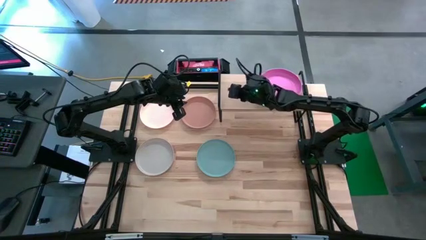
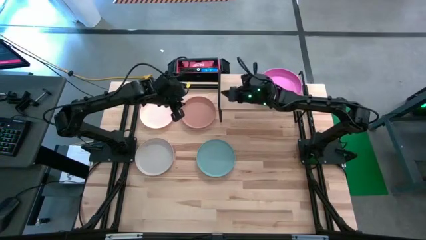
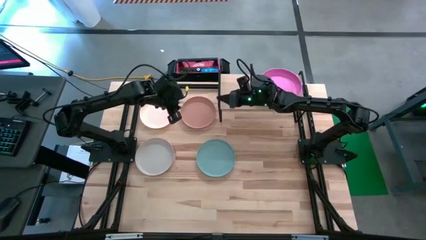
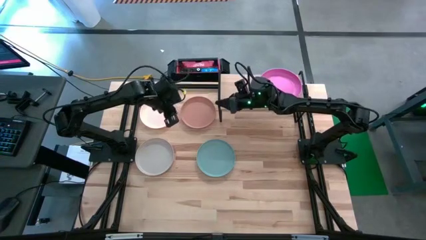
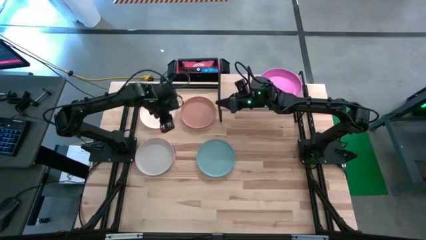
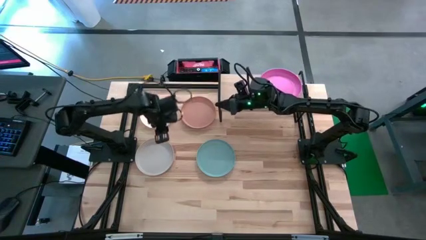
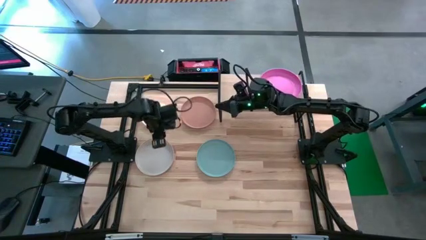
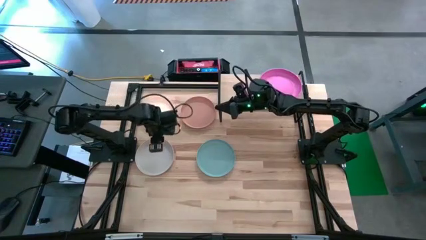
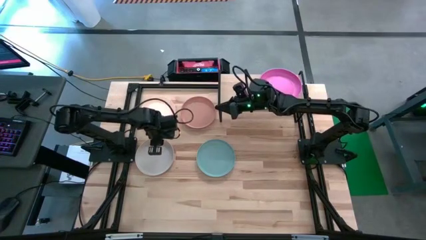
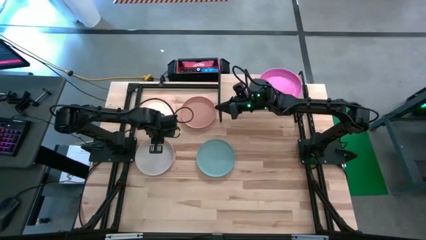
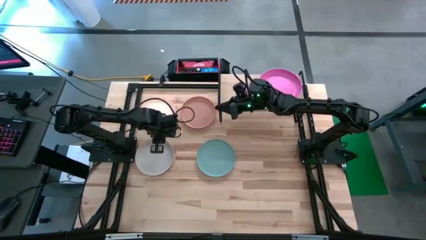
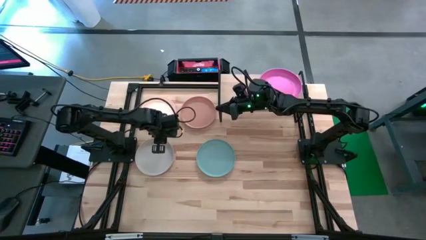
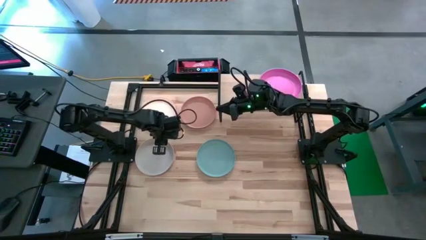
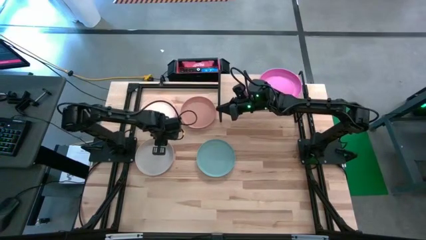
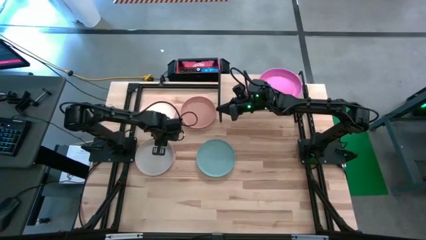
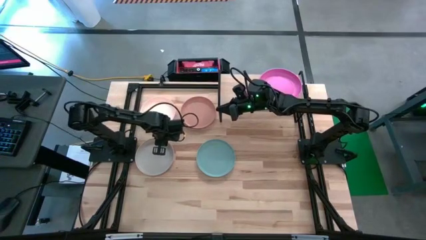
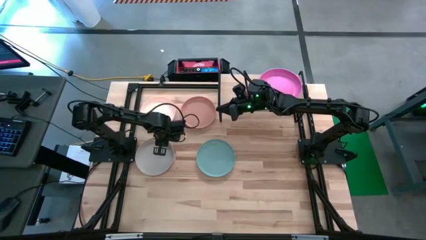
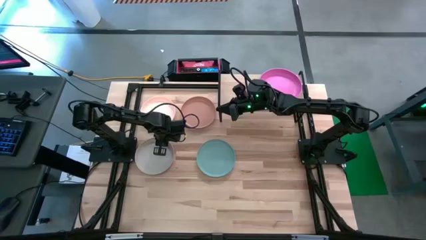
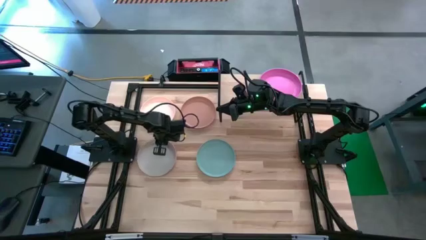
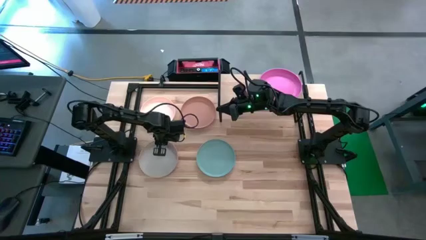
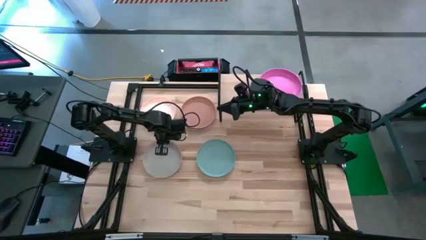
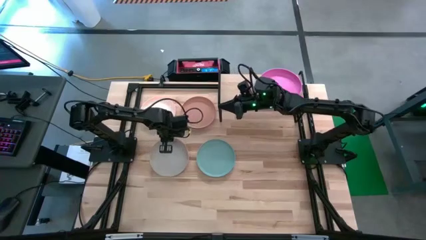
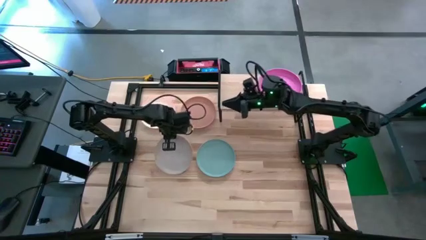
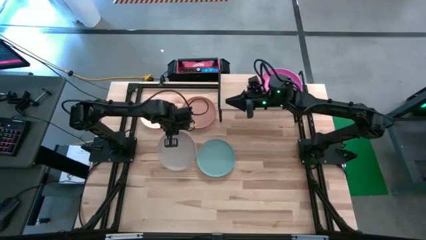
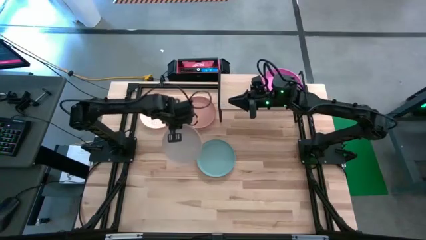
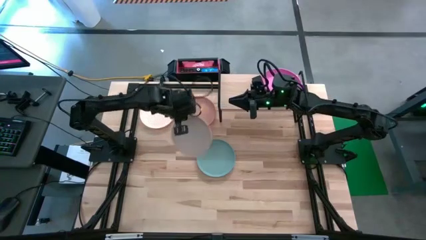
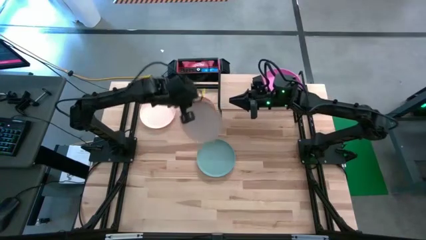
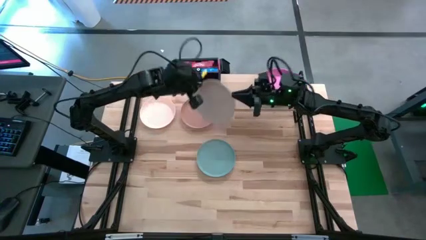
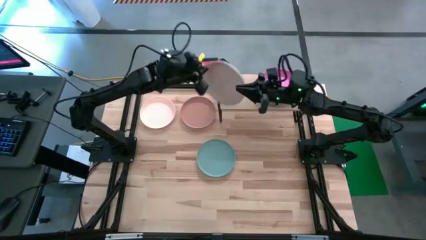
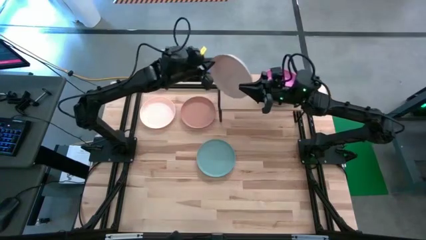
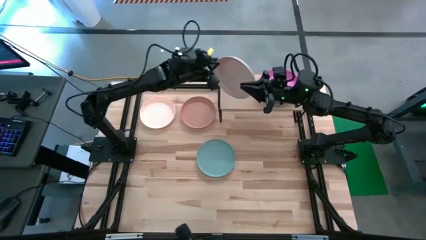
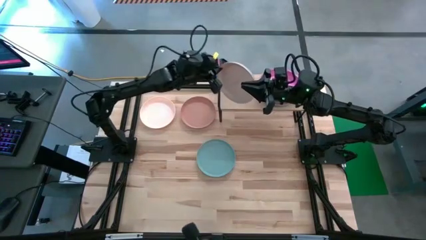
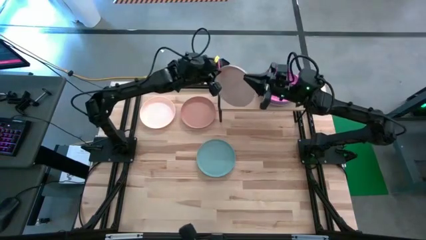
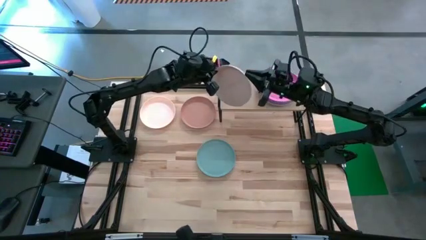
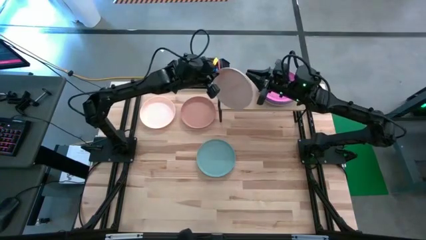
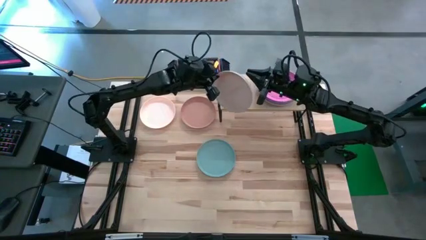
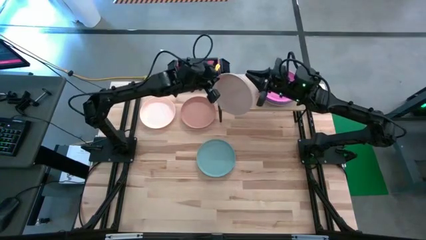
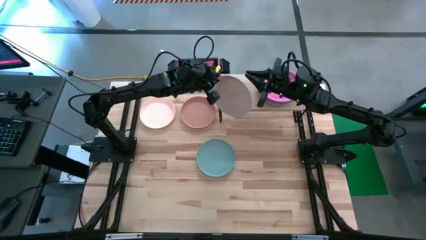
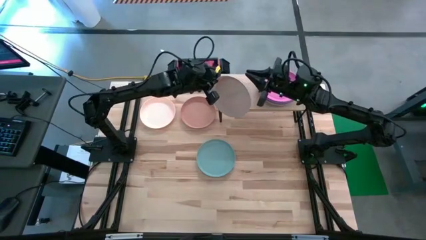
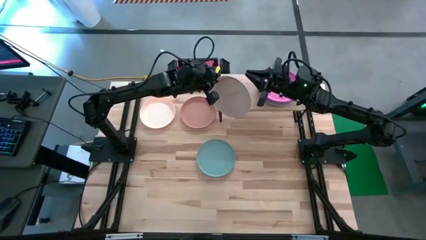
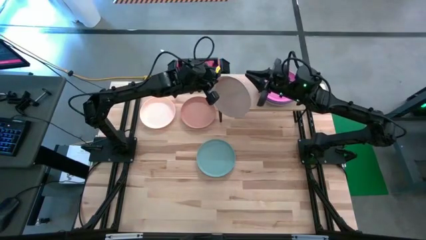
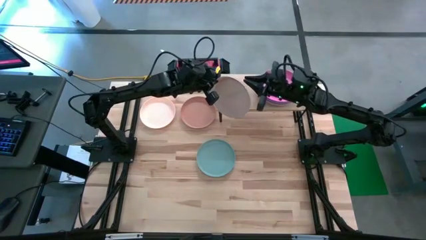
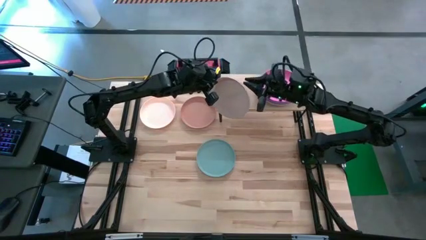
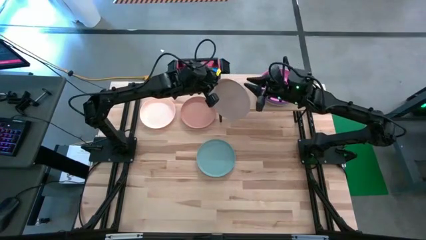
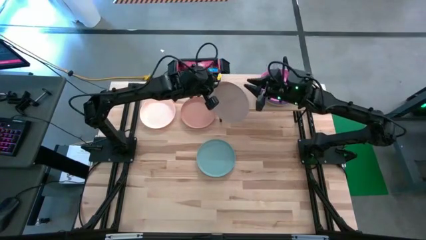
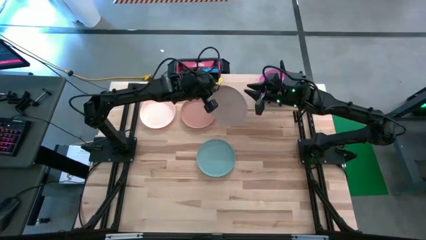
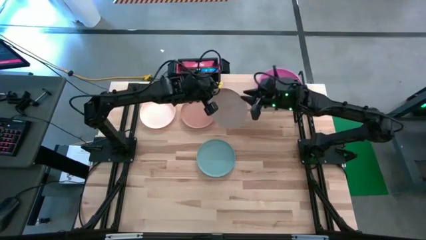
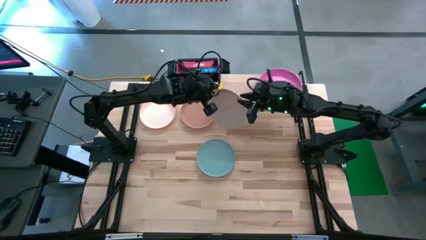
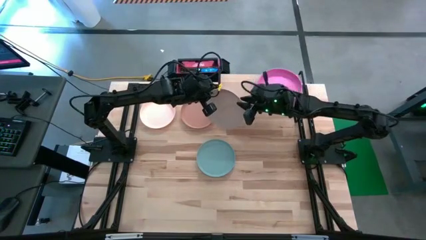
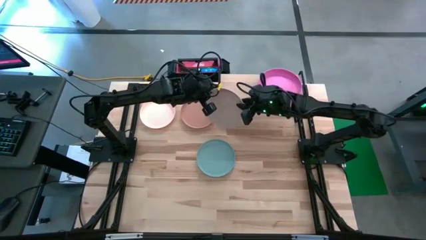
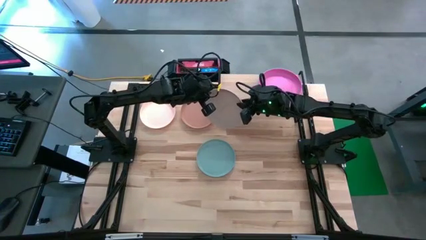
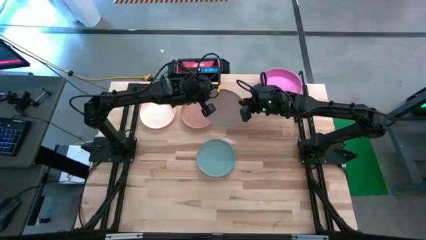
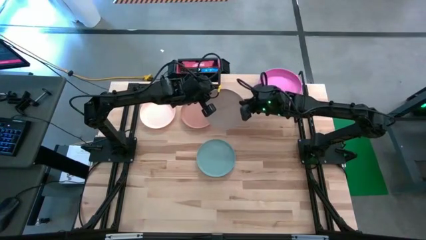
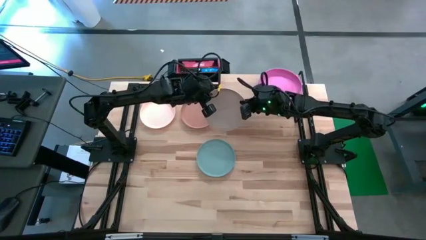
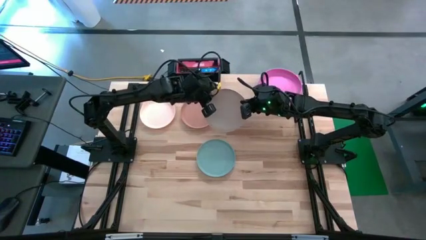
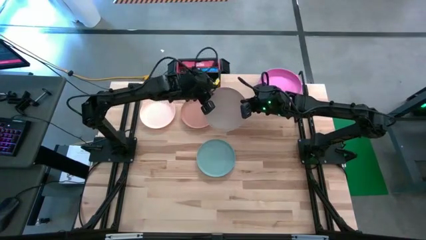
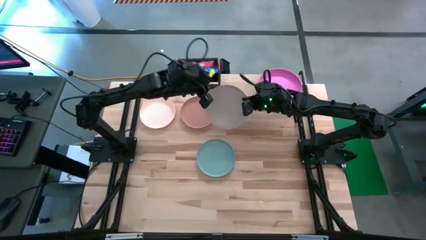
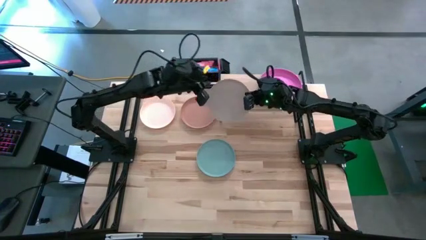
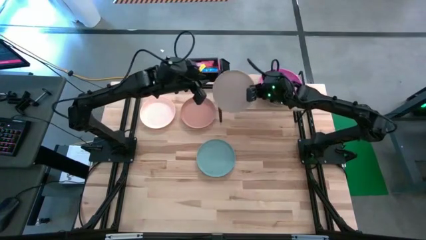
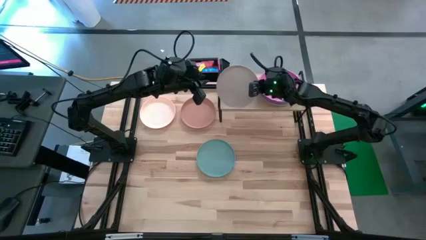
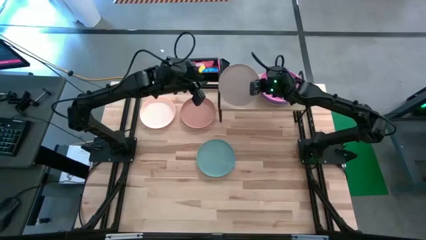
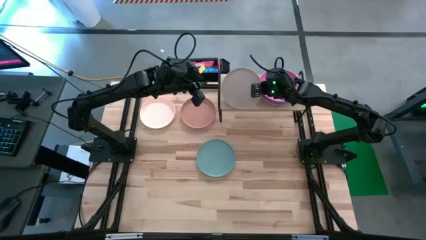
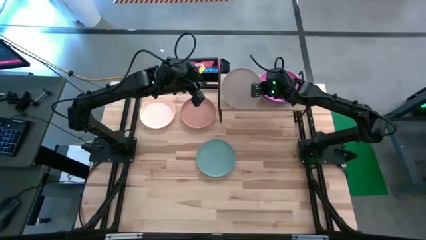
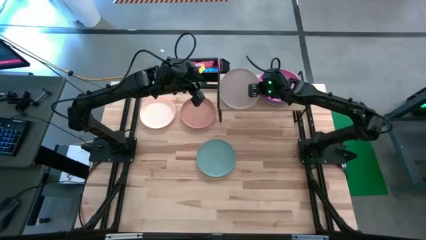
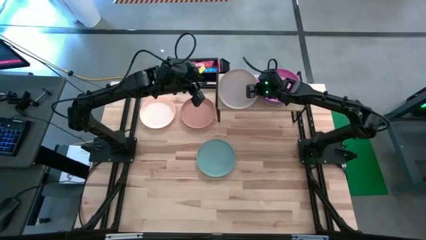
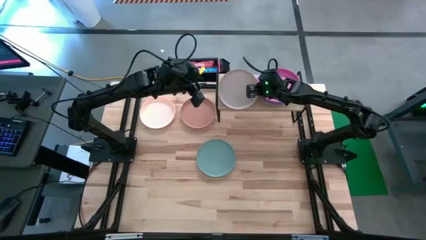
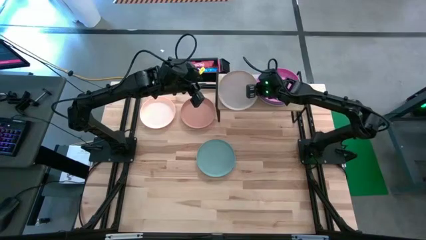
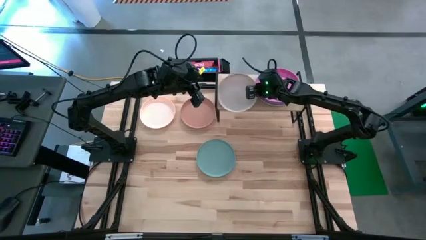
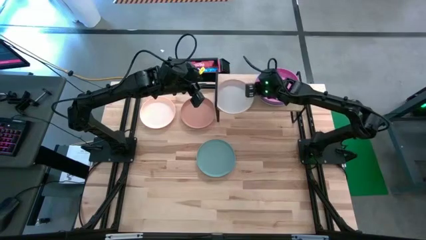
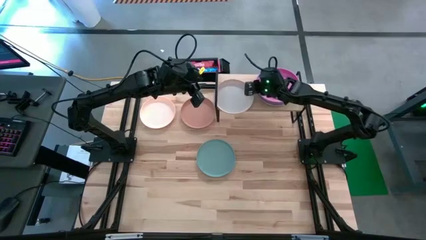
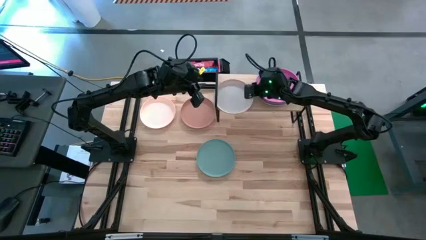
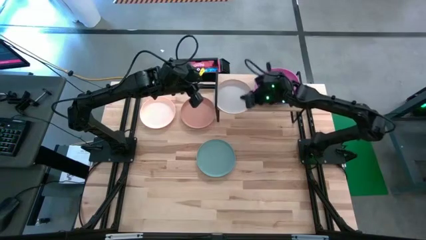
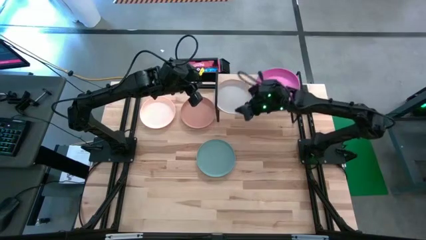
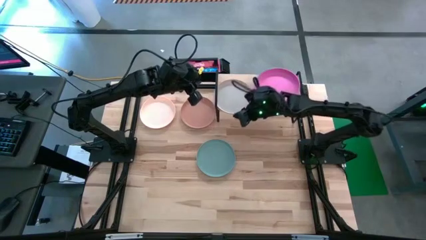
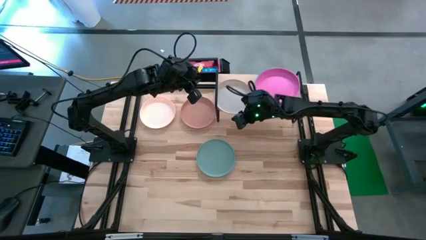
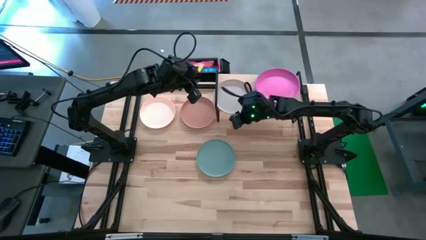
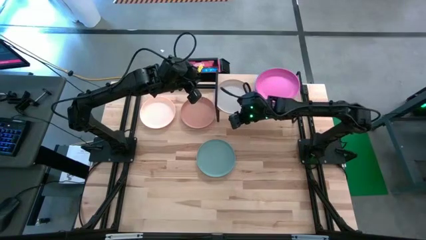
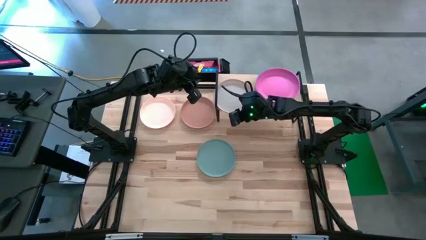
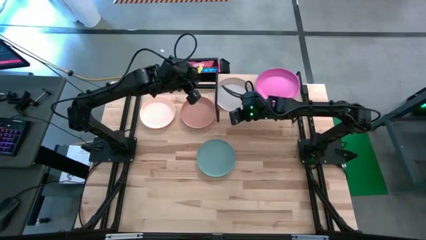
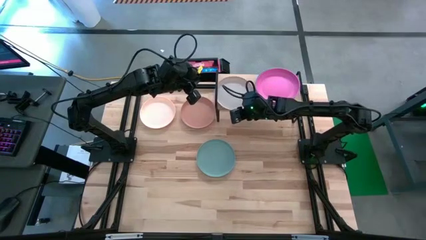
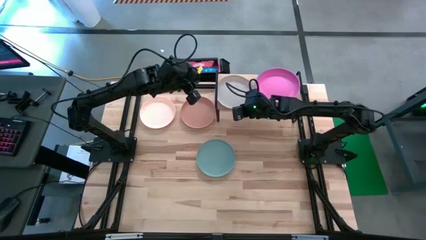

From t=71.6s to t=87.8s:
Task: Place and stack plates onto a shelf
Put the gray plate on the shelf
